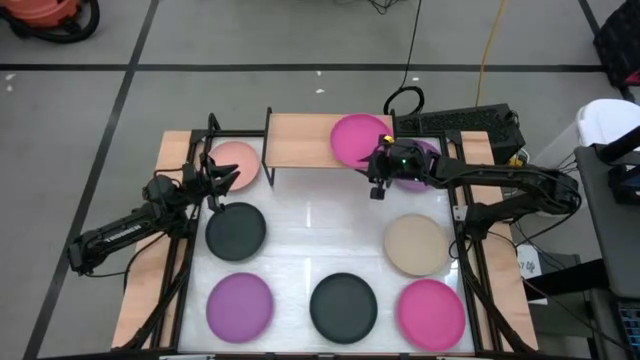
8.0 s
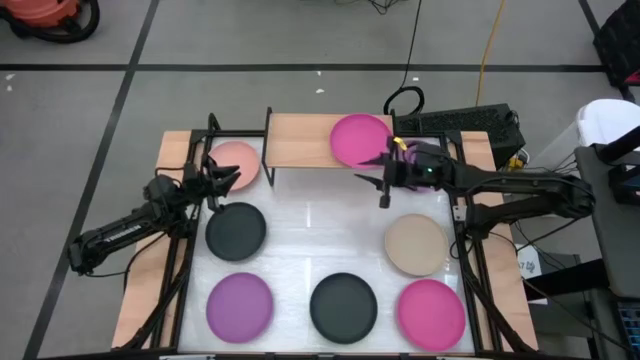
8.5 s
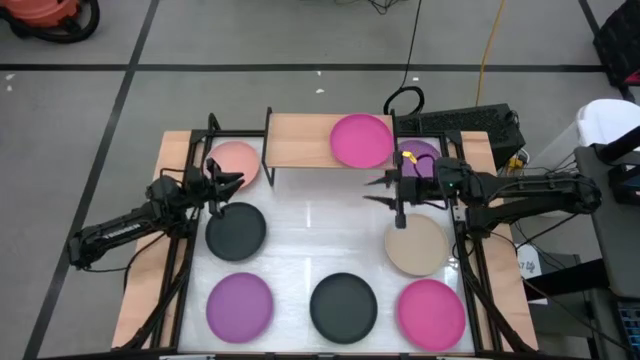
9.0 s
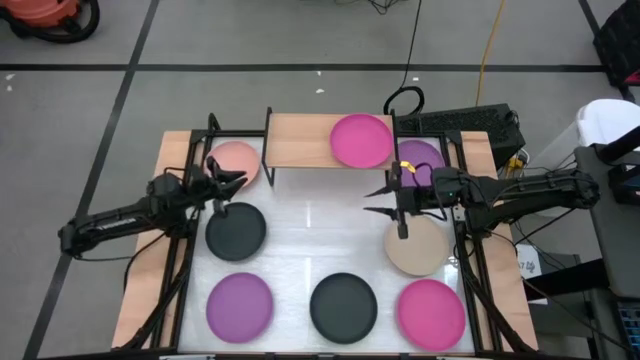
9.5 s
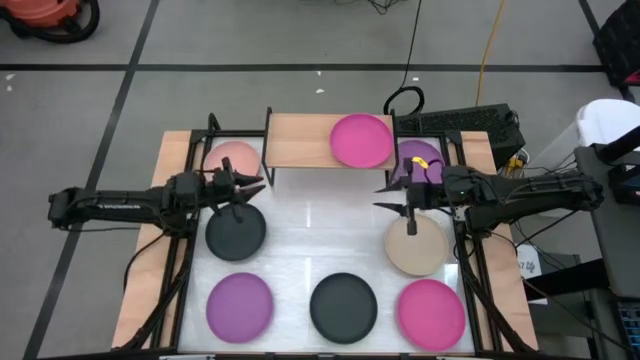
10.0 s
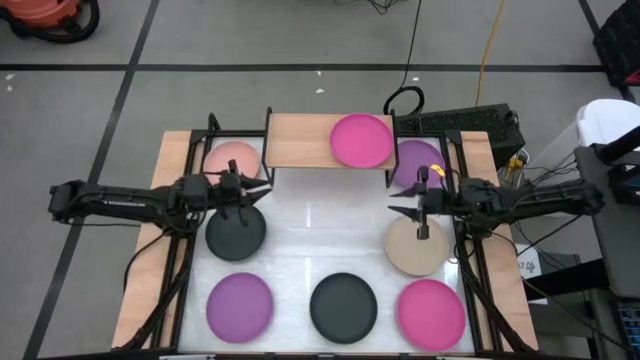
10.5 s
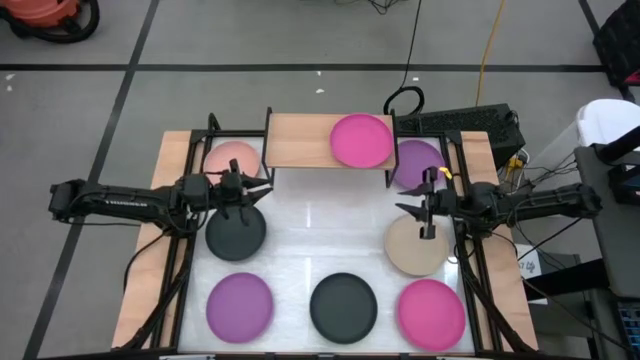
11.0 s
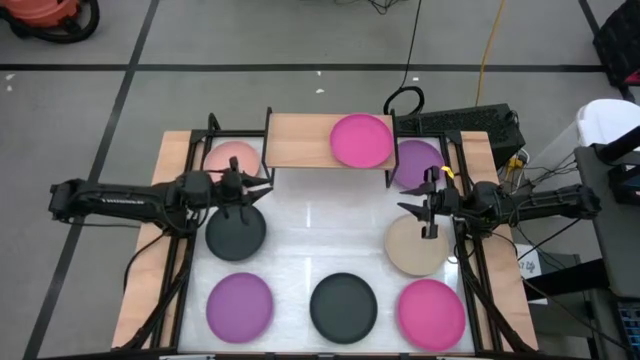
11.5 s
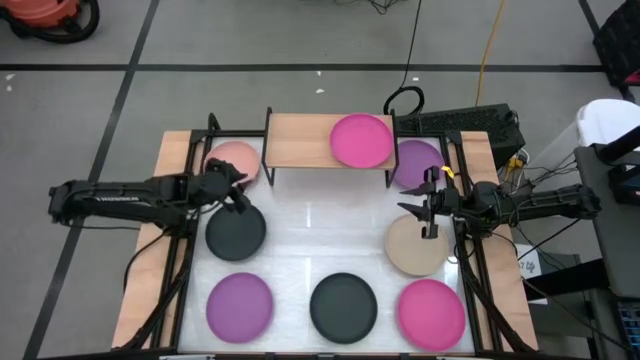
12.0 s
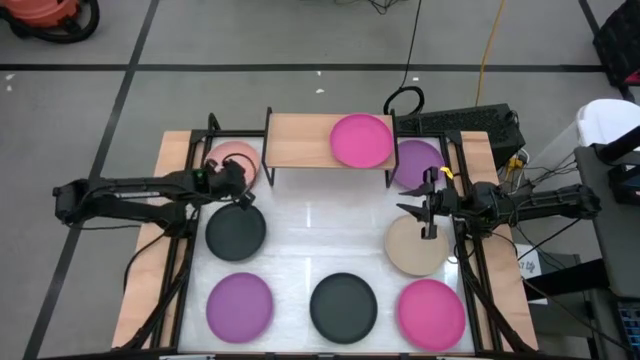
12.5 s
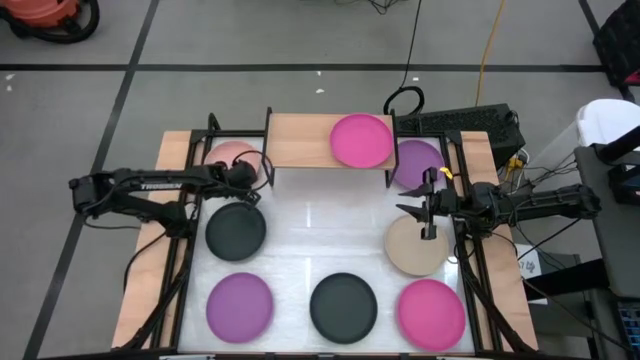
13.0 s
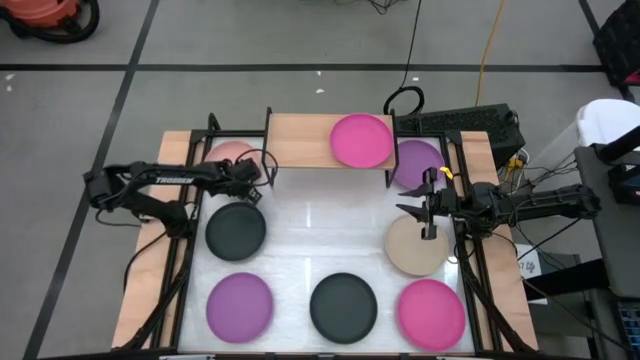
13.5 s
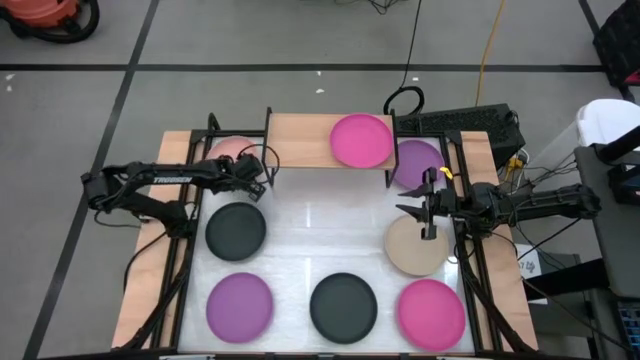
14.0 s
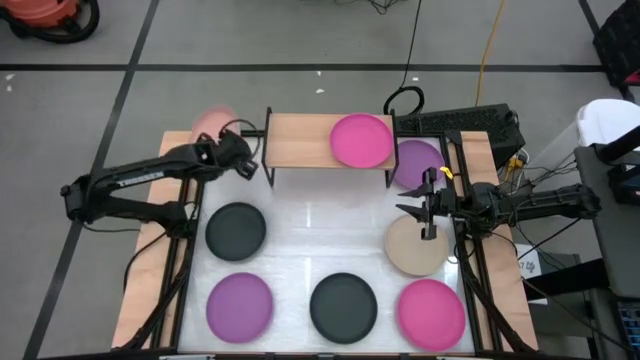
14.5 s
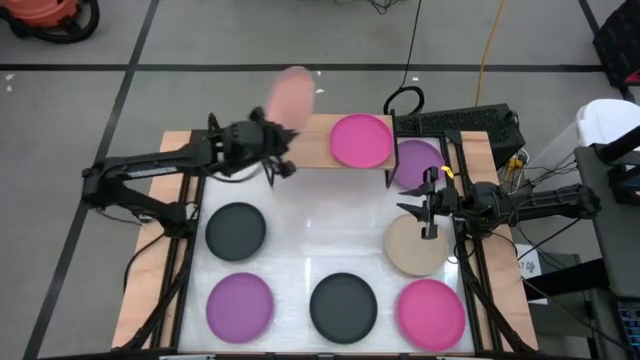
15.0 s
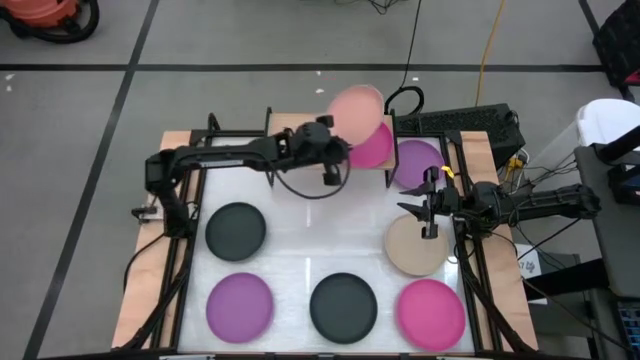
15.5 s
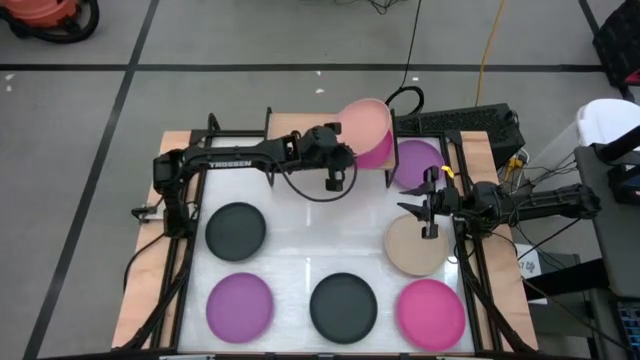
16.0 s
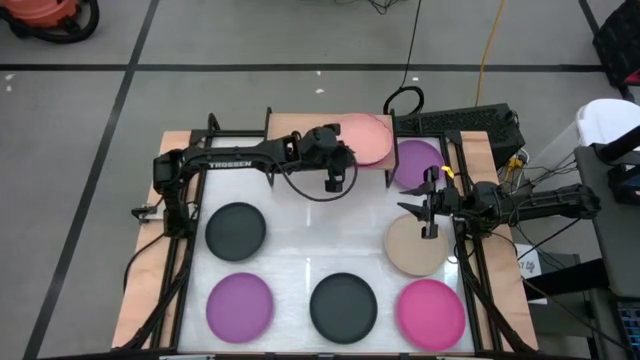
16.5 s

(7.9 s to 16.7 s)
Task: Place and stack plates onto a shelf
Stack the light orange plate on top of the pink plate on the shelf

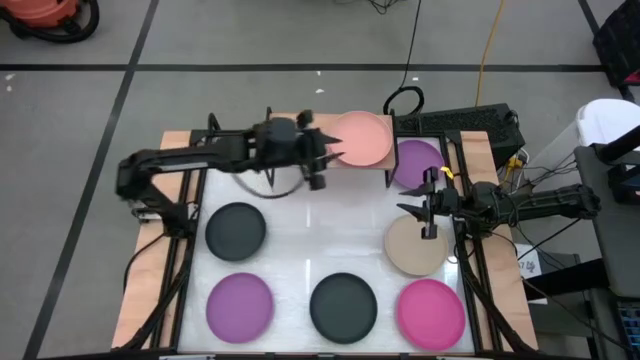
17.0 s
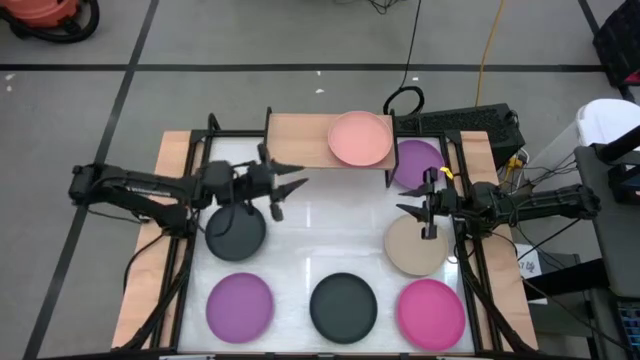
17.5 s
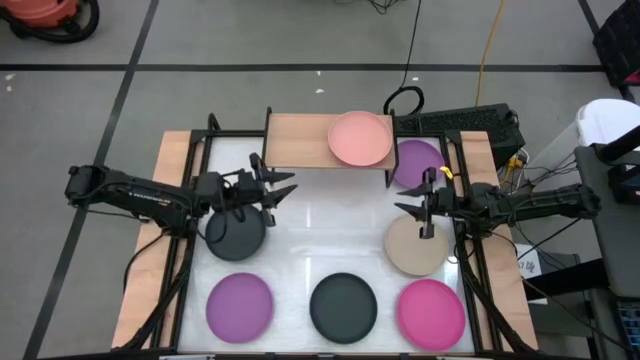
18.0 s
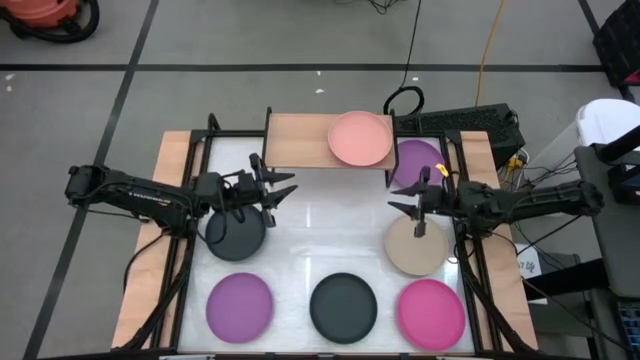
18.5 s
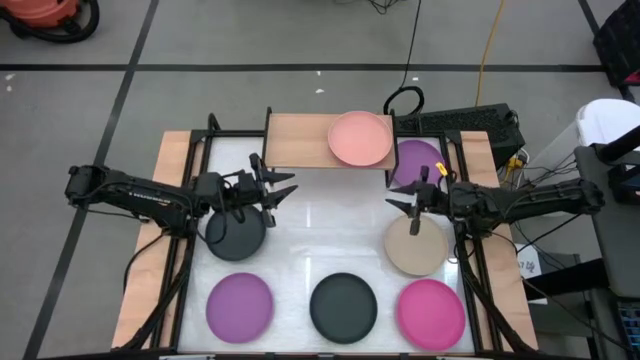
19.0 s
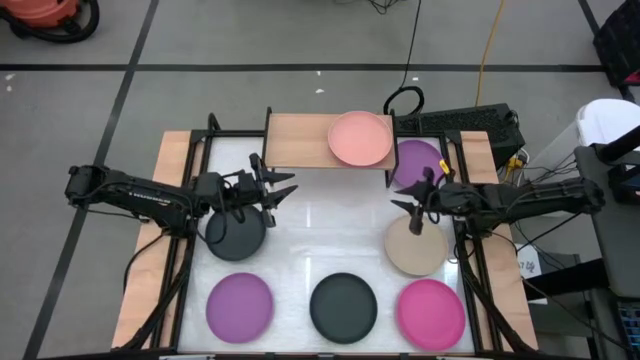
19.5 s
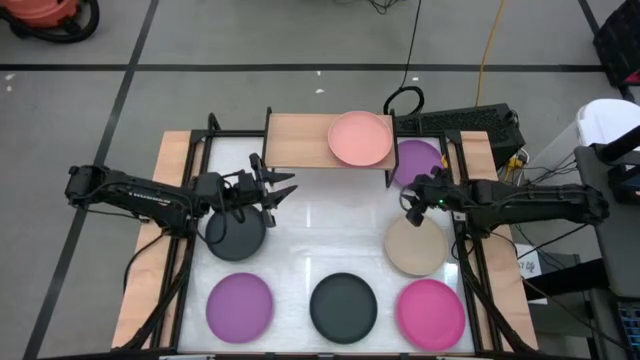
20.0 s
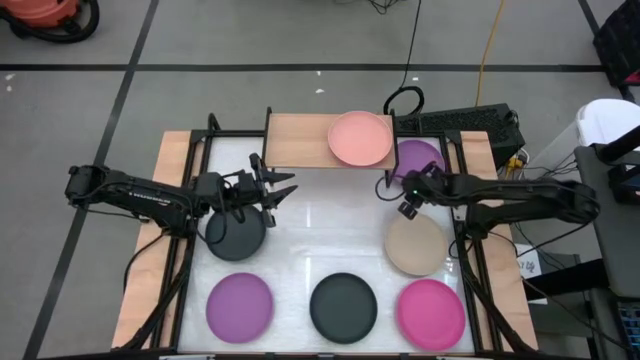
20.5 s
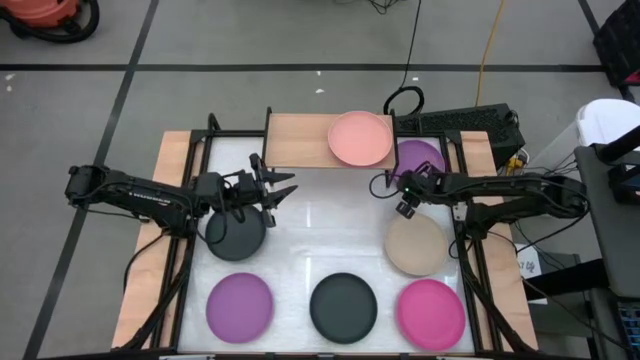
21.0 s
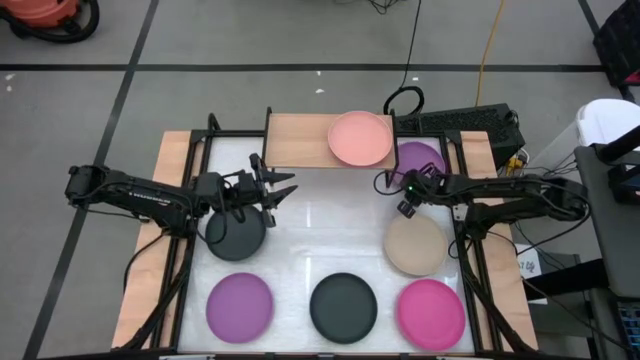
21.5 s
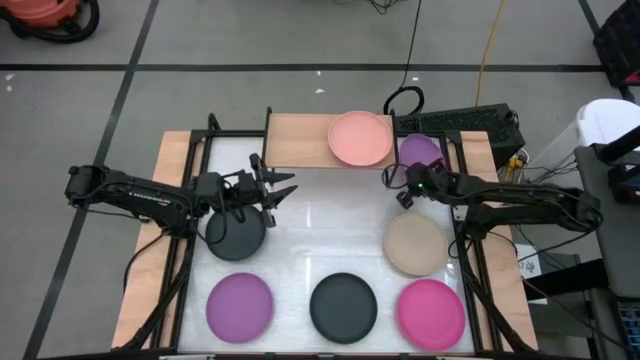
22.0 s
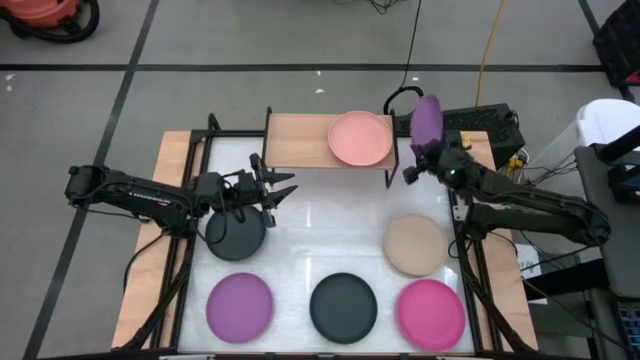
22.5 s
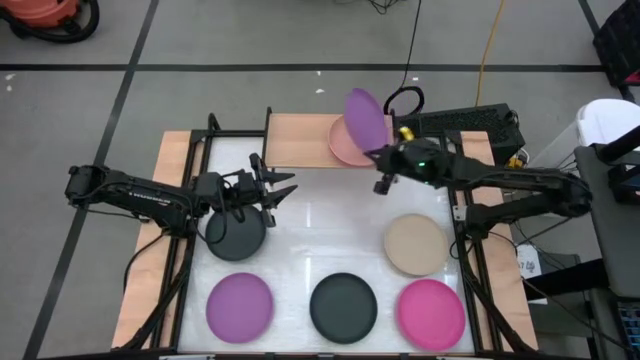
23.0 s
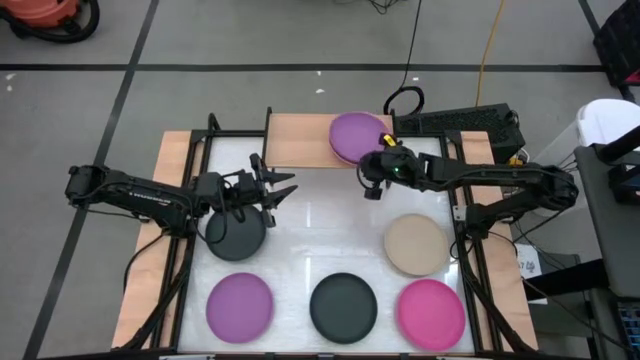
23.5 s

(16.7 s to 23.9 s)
Stack the top violet plate on top of the light orange plate on the shelf

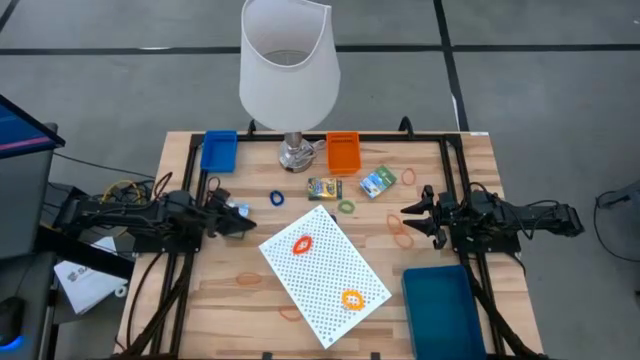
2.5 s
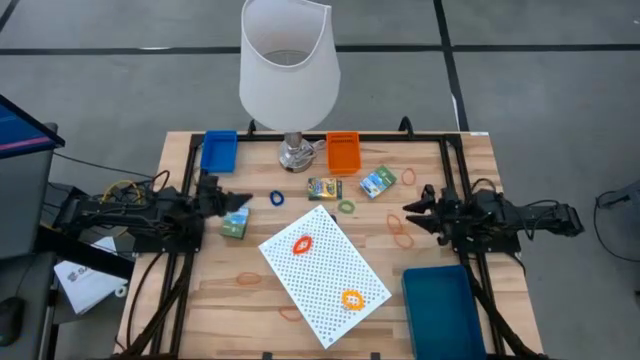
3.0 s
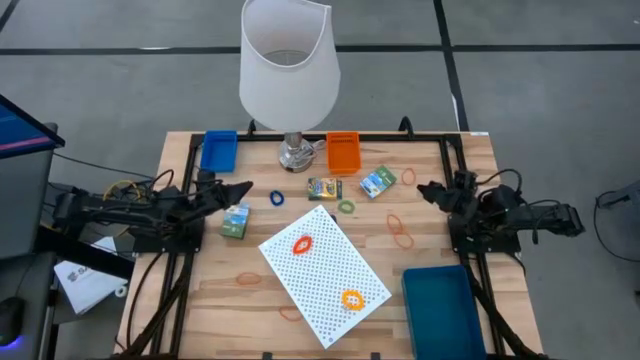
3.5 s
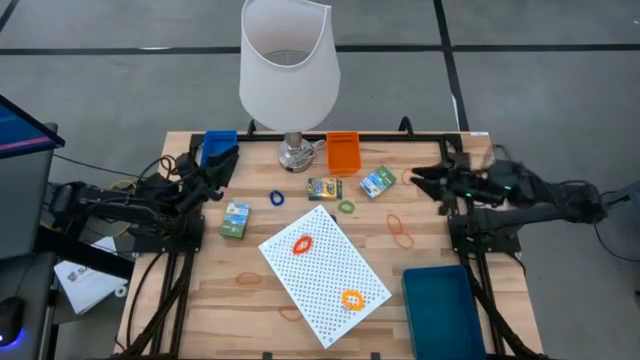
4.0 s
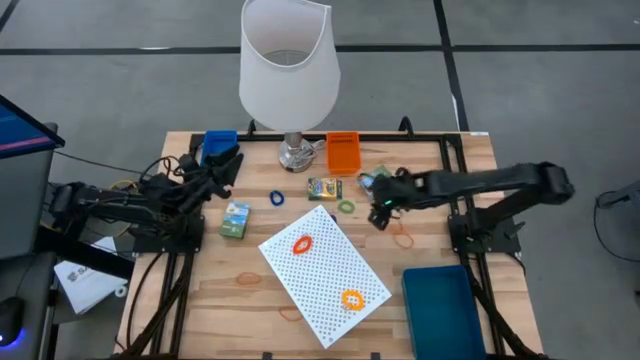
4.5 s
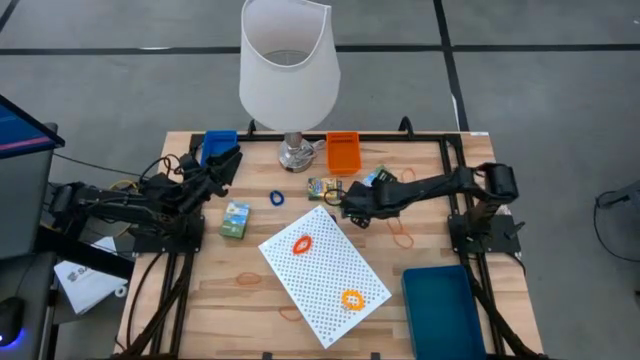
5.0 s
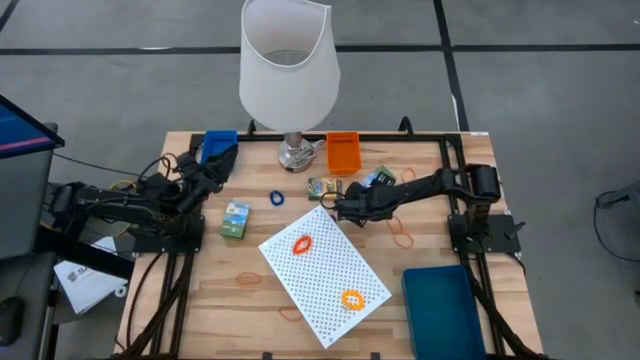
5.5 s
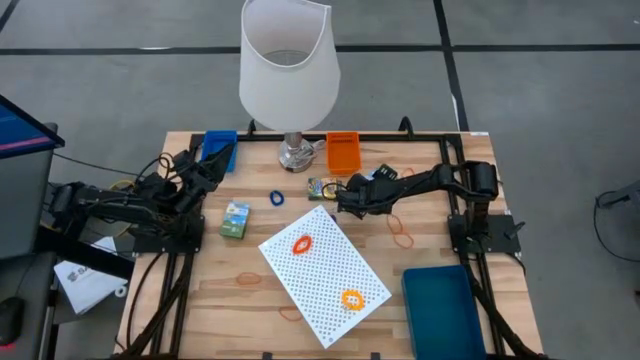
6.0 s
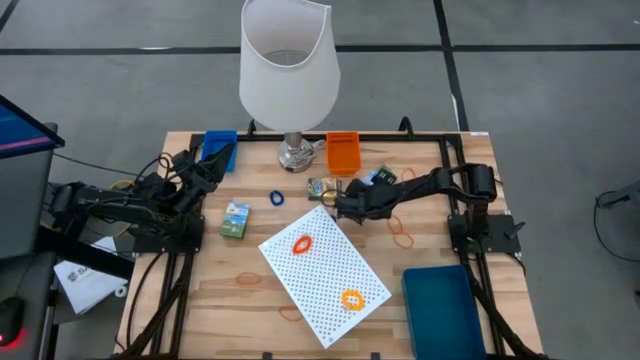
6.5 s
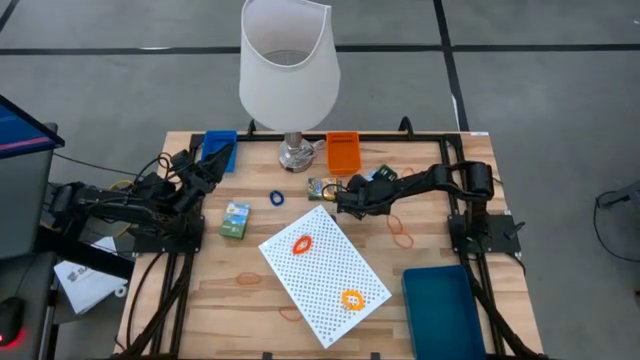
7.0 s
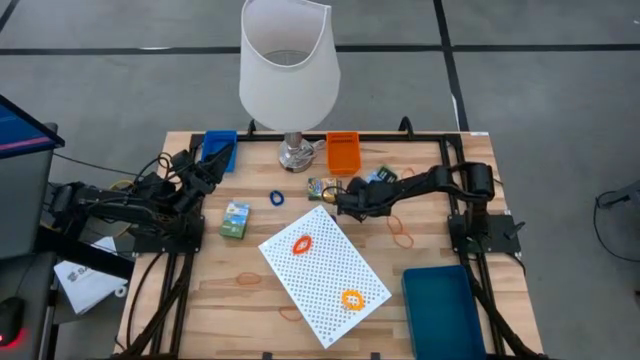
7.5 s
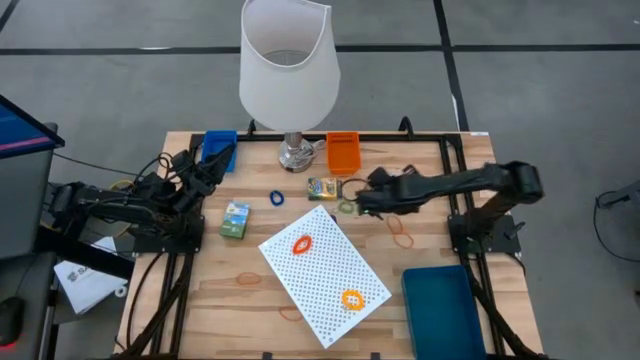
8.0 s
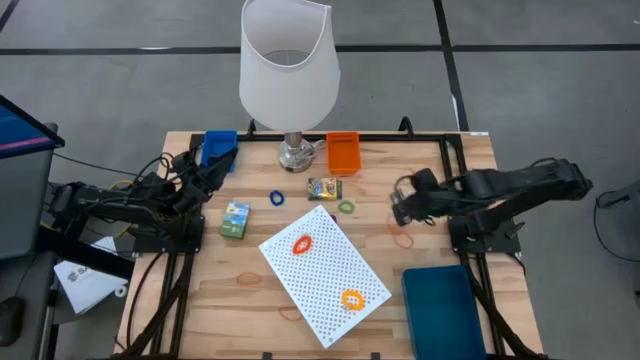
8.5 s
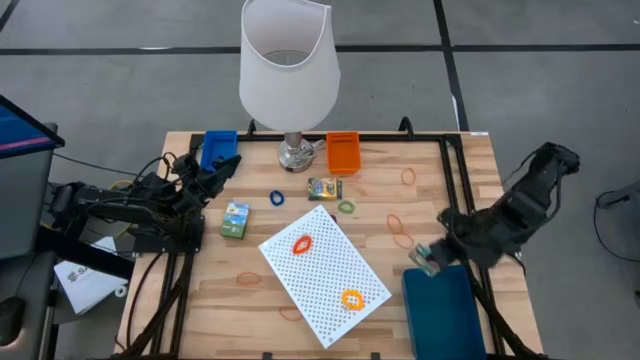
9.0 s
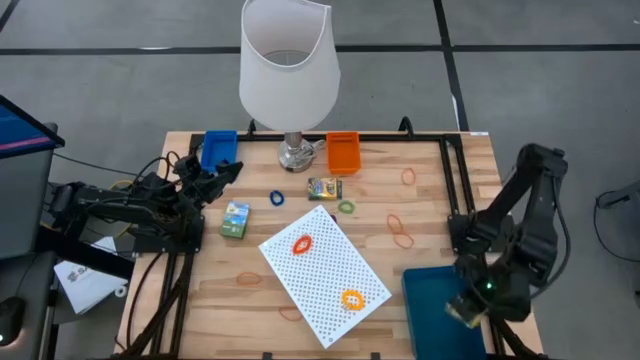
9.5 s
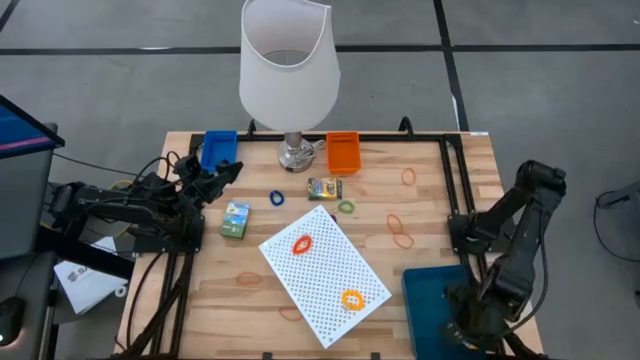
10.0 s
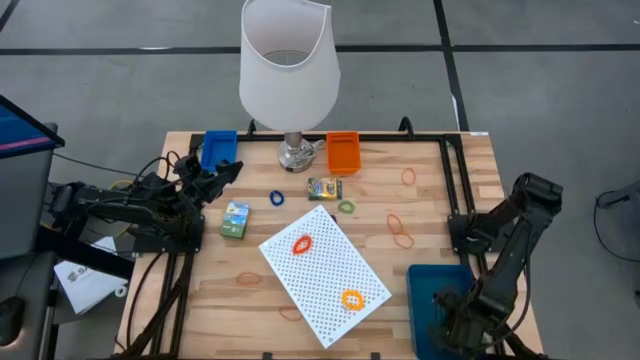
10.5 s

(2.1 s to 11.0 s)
Task: Pick & Place Office Desk Supplies
Put the crayon box into the blue bin
